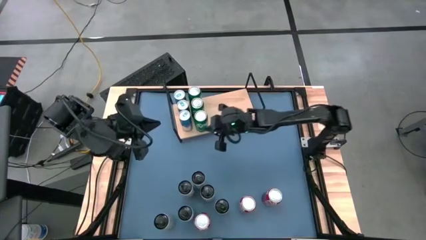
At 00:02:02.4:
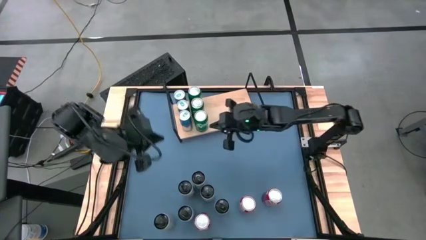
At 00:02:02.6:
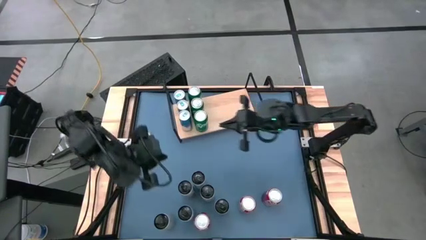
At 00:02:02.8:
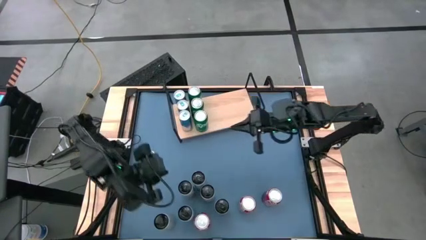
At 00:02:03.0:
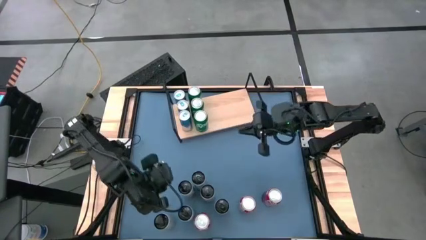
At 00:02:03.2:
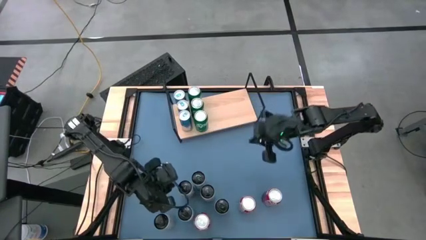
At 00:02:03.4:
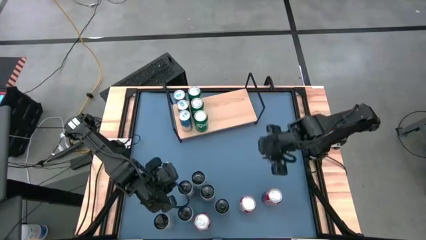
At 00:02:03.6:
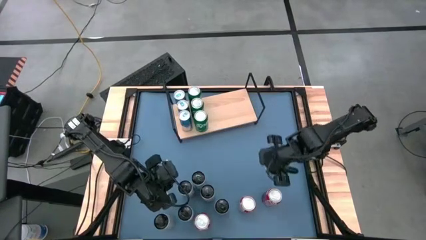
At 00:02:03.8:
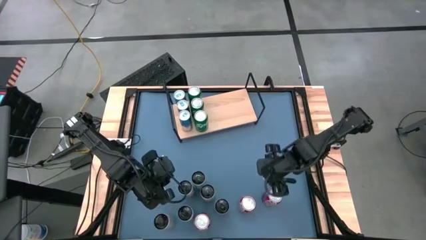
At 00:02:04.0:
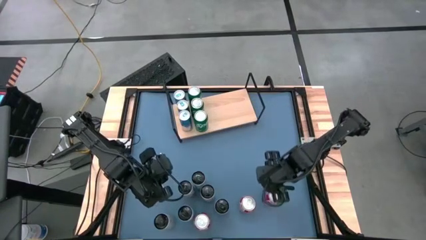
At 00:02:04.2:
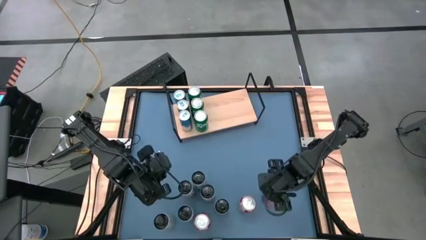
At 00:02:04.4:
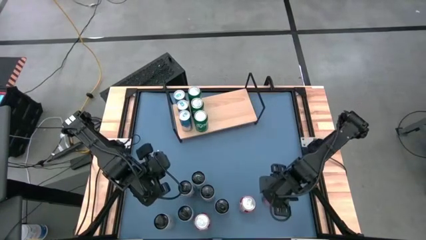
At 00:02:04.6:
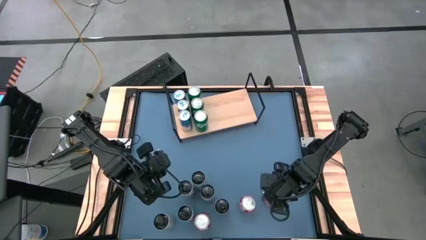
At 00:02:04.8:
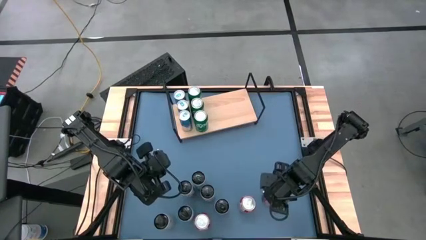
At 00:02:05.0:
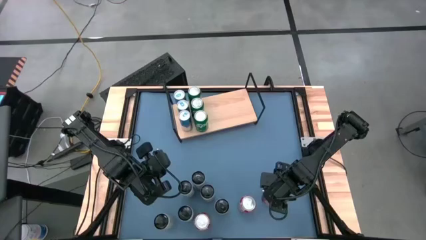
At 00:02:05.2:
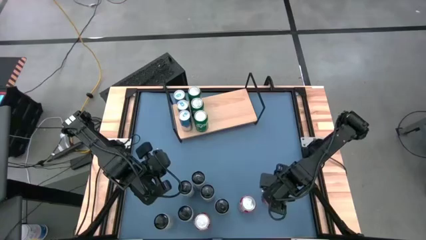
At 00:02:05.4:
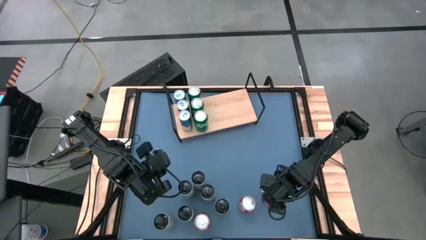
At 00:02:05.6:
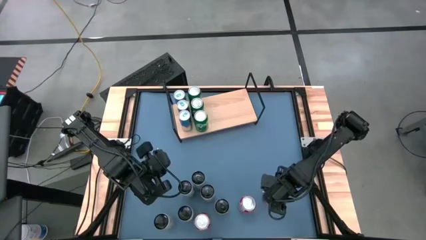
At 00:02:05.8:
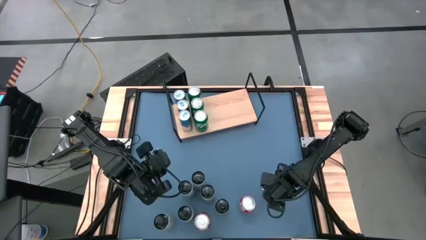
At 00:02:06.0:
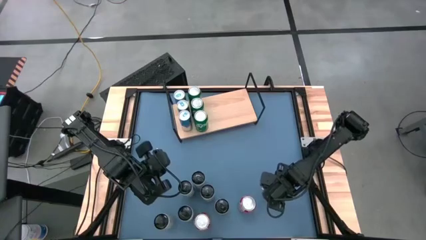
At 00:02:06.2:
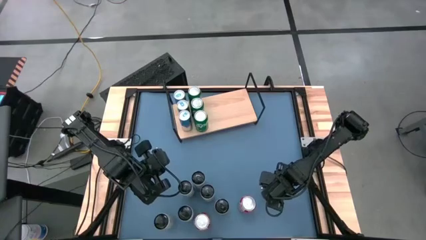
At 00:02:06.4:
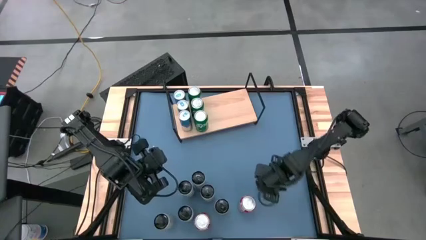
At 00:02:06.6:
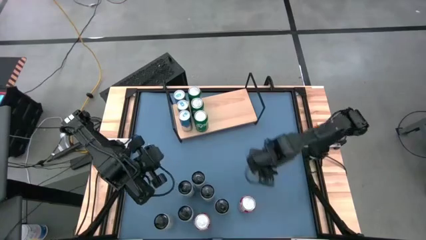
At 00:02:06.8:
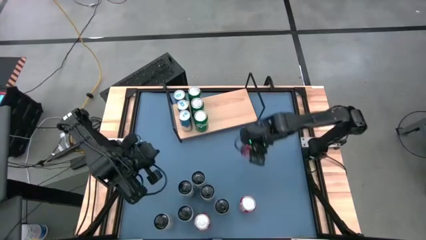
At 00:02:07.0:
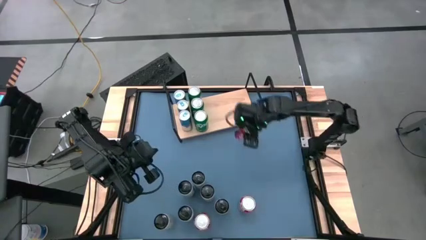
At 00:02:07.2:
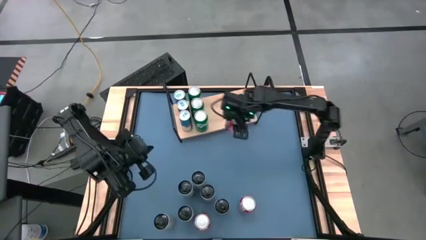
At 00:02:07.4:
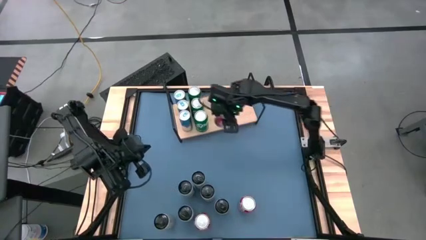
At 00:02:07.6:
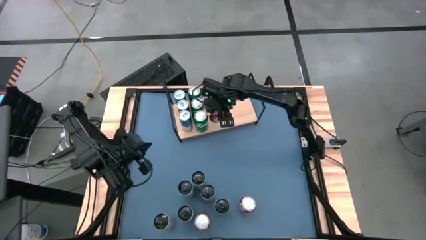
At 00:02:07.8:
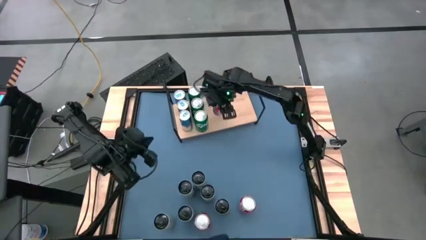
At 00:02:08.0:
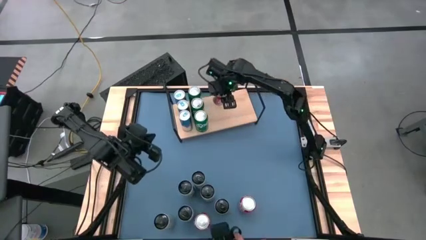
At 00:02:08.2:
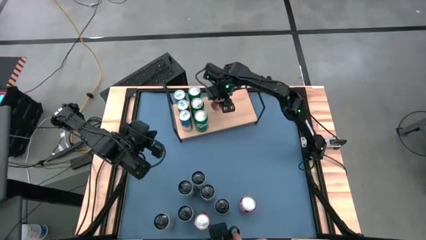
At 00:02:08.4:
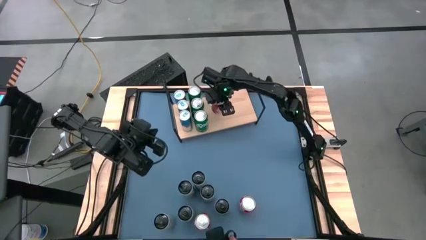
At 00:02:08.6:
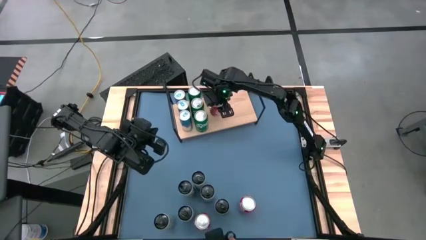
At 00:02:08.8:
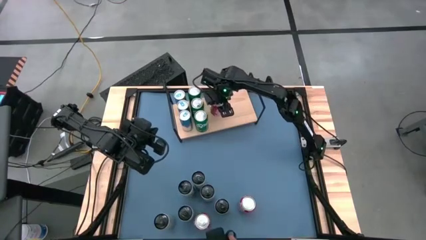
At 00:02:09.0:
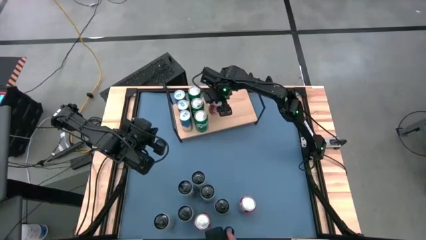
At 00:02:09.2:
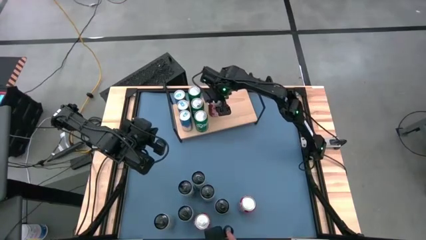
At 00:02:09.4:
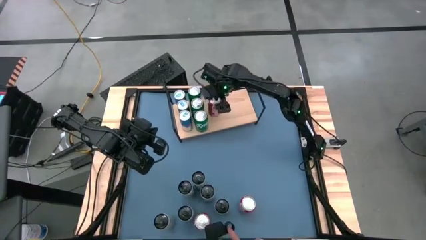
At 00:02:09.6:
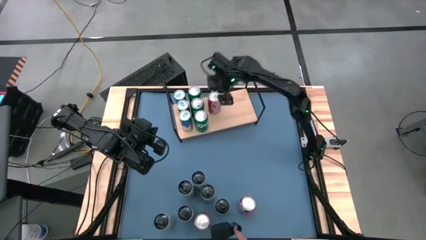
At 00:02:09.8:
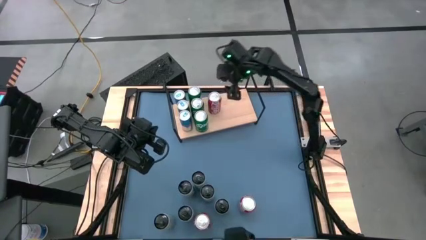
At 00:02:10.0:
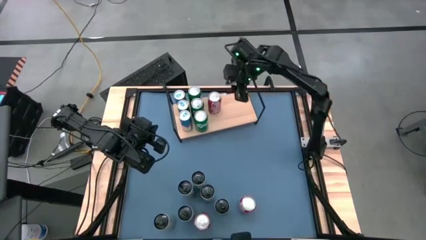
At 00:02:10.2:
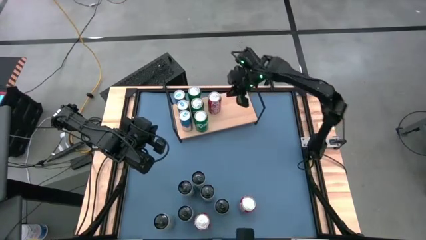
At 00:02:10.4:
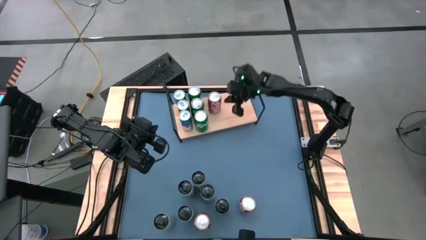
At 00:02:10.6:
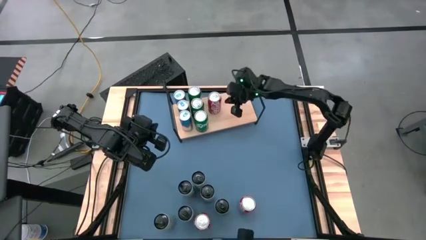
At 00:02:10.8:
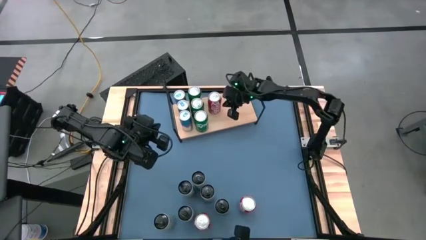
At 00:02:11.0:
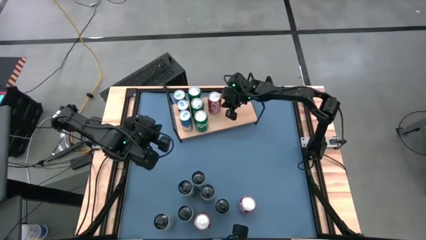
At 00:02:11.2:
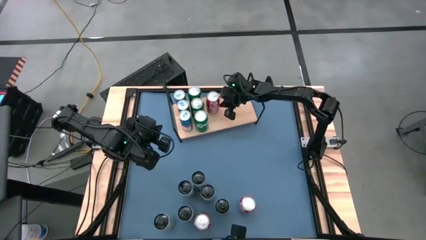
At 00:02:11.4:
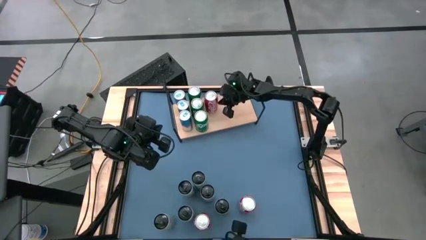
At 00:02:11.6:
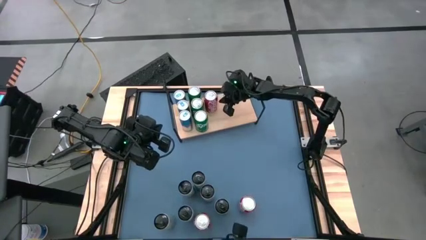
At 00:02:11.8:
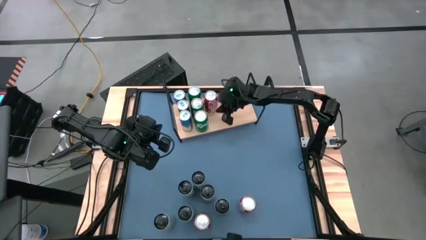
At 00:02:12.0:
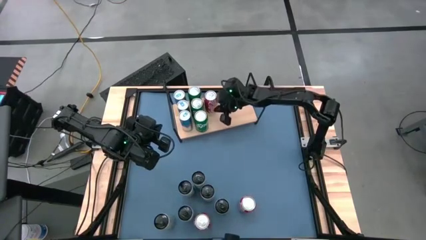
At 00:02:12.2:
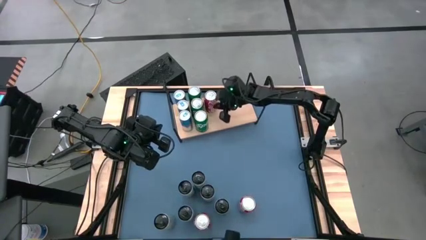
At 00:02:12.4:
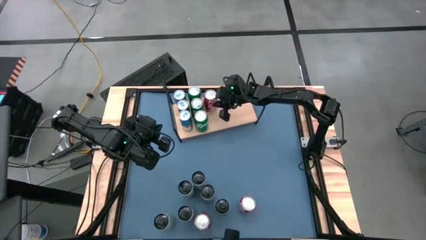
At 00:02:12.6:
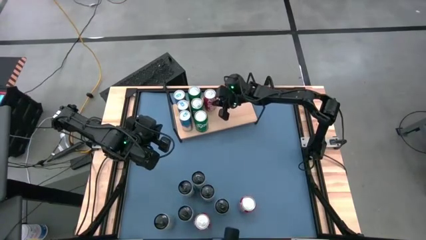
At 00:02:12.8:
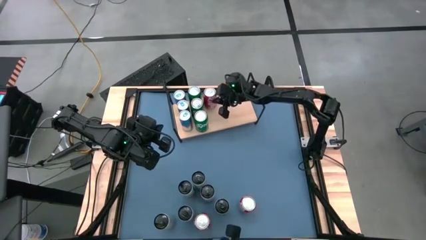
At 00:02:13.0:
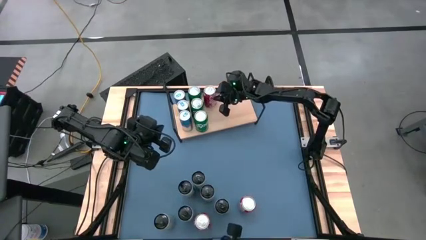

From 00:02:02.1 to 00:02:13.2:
Task: Place canned beverage on shelf
Put the top right red soda can on the shelf
